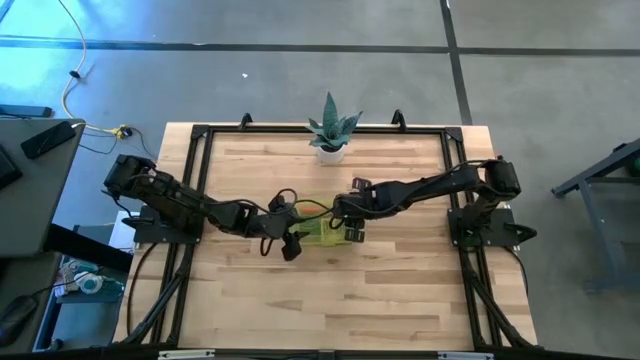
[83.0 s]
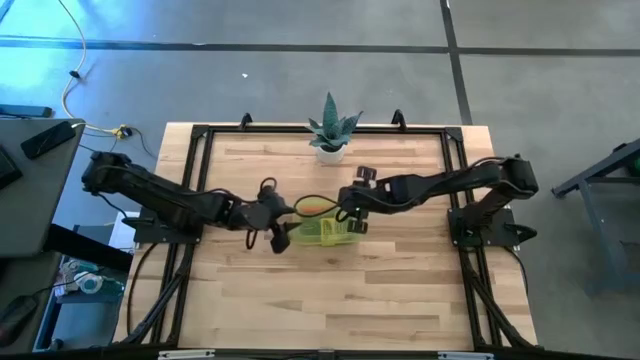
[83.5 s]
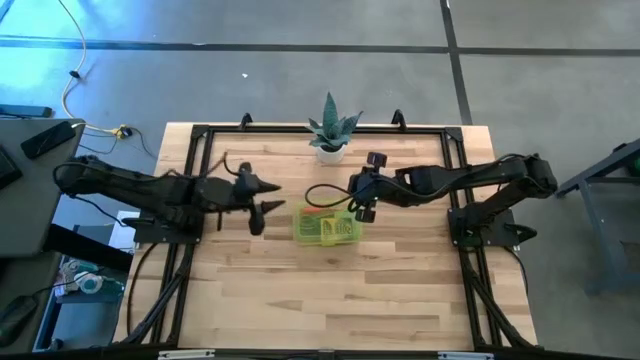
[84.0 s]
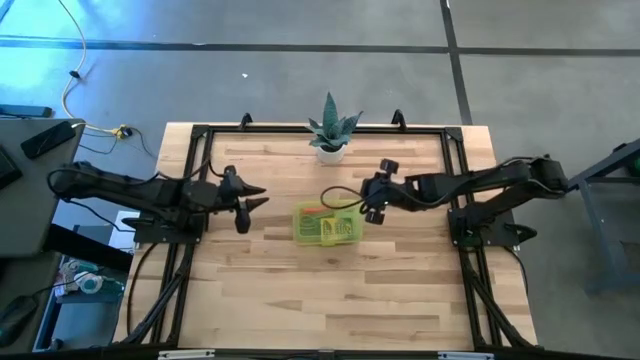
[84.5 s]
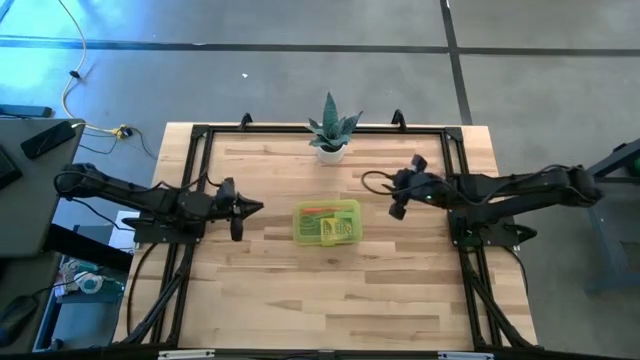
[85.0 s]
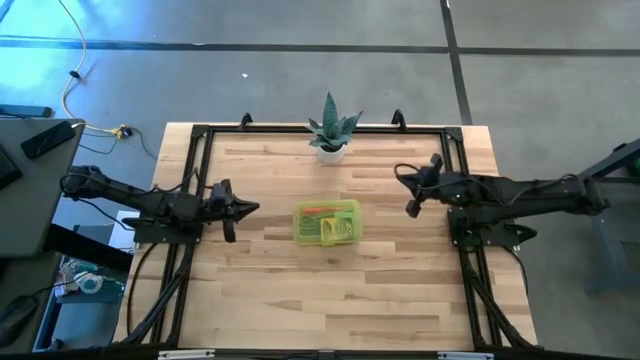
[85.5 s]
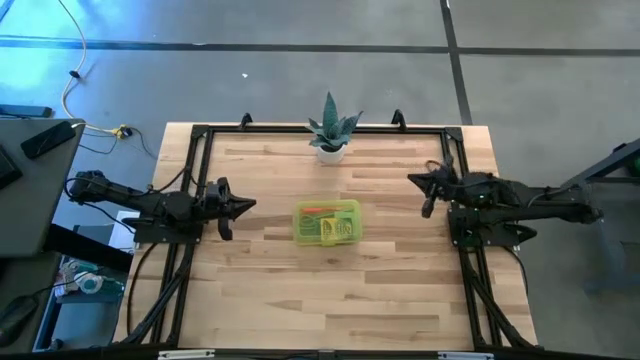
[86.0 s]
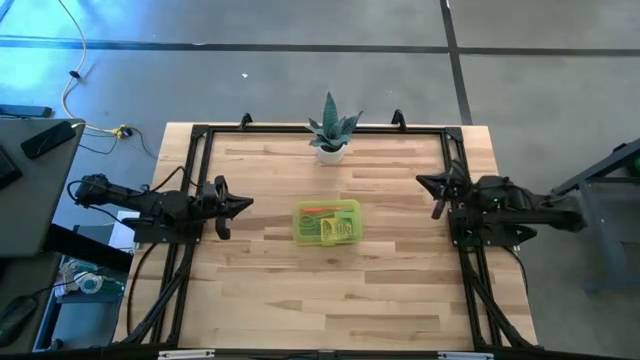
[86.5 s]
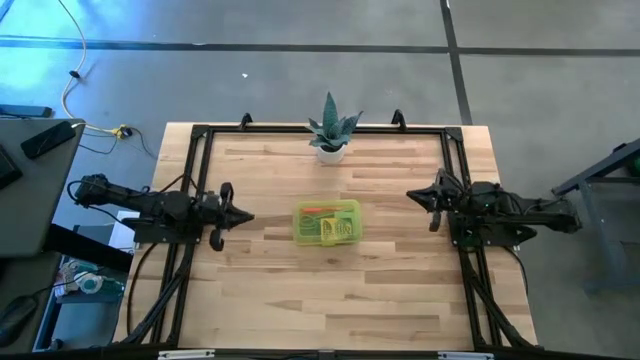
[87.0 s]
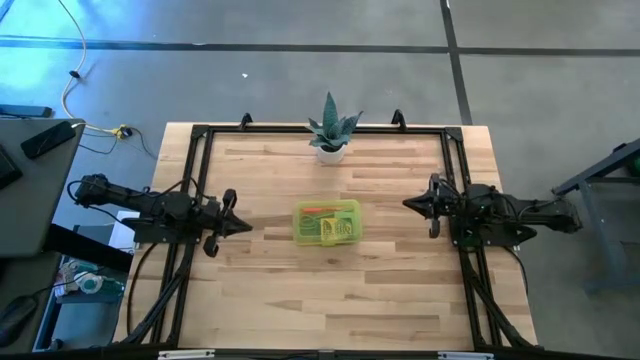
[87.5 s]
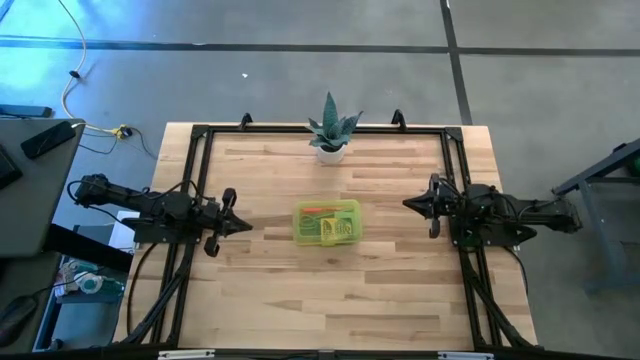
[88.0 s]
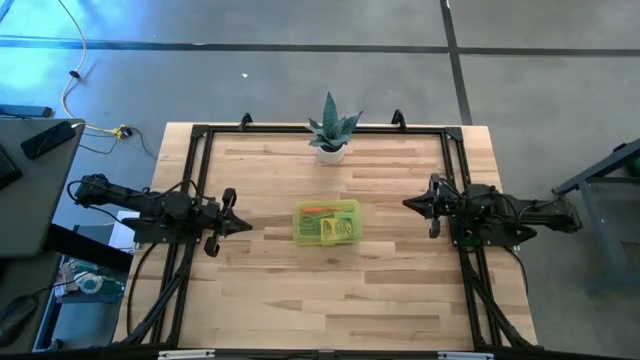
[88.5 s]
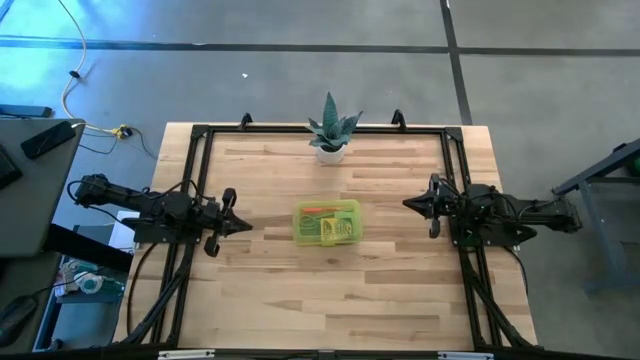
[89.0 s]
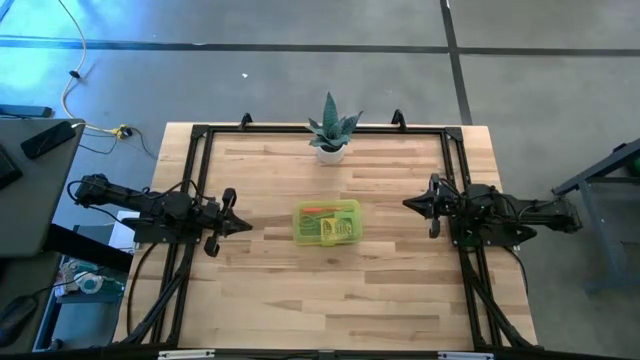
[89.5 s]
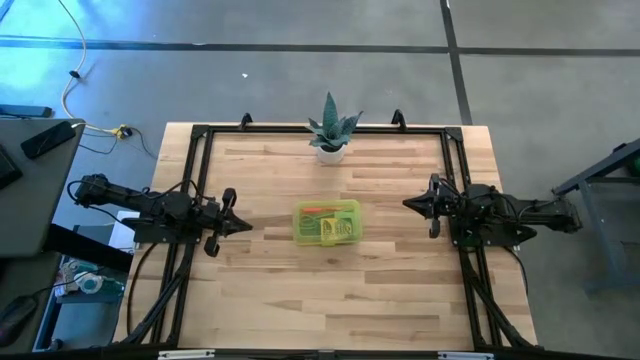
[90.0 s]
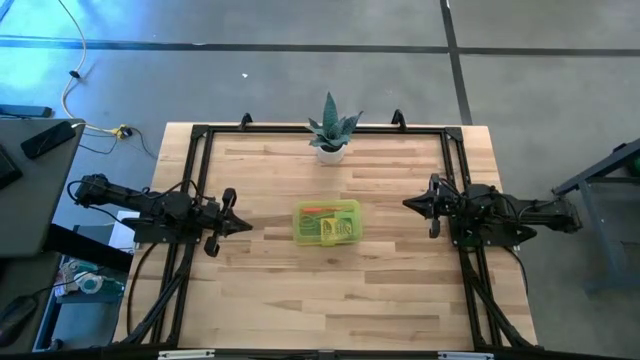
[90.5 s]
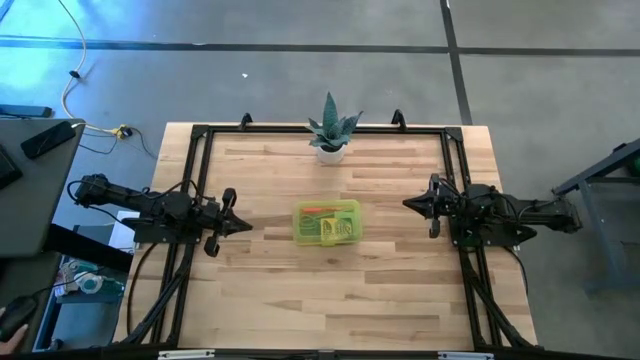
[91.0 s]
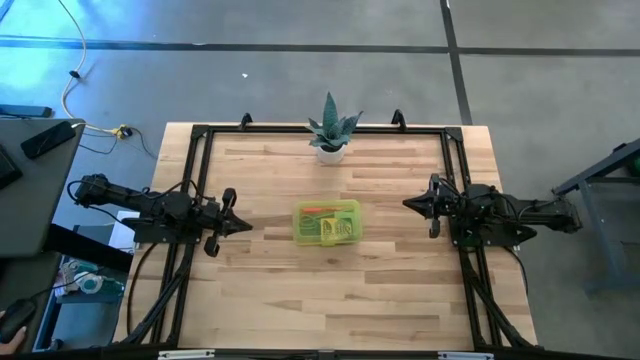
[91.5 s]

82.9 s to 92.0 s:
Task: Pack school essentials
Return to Home Position

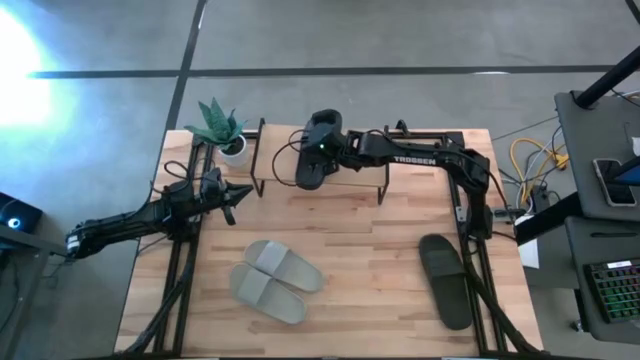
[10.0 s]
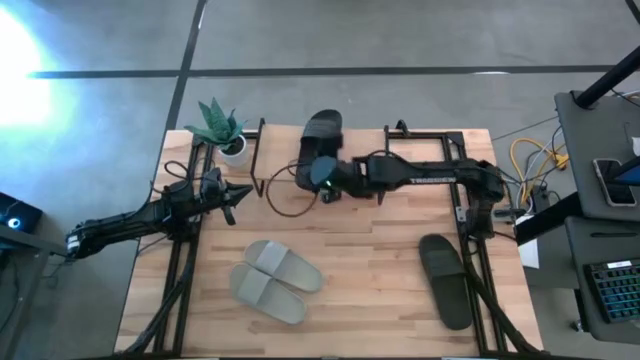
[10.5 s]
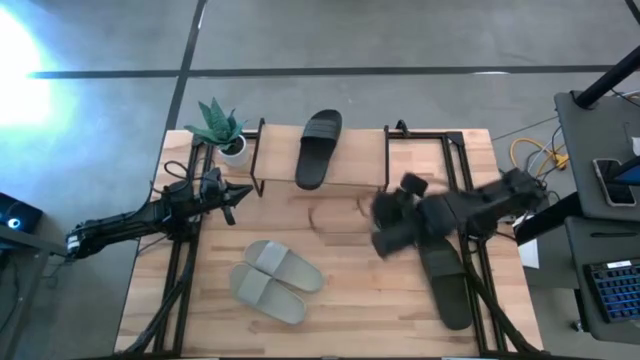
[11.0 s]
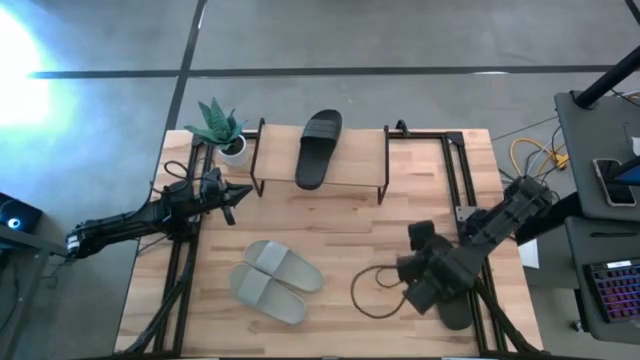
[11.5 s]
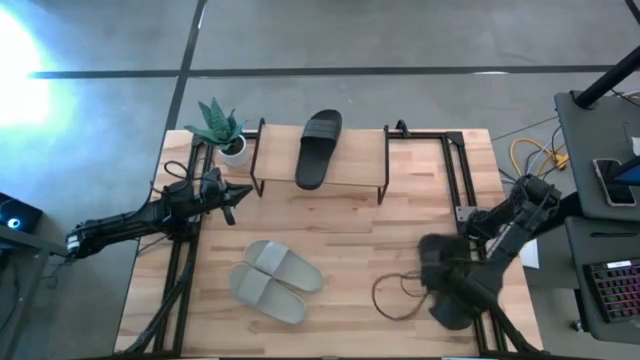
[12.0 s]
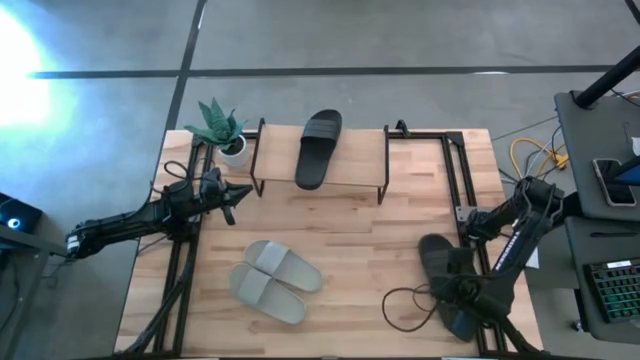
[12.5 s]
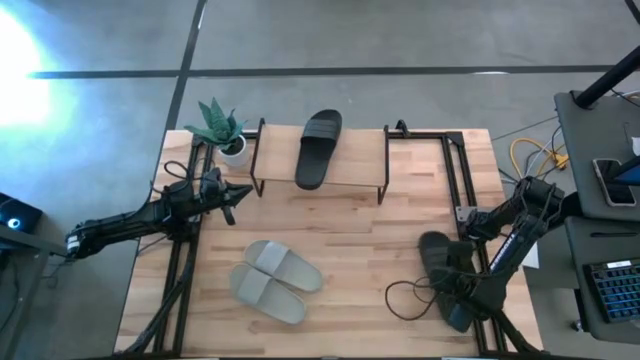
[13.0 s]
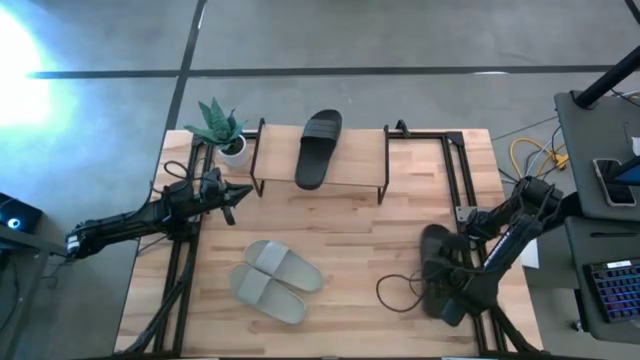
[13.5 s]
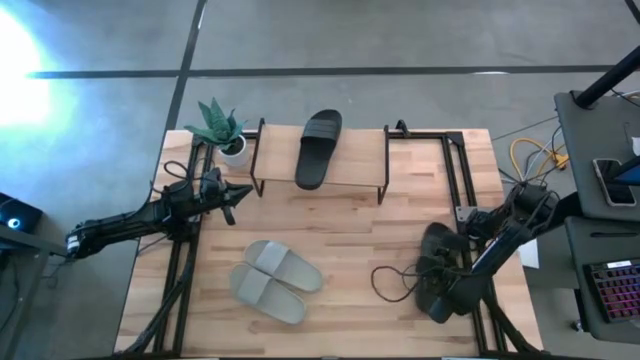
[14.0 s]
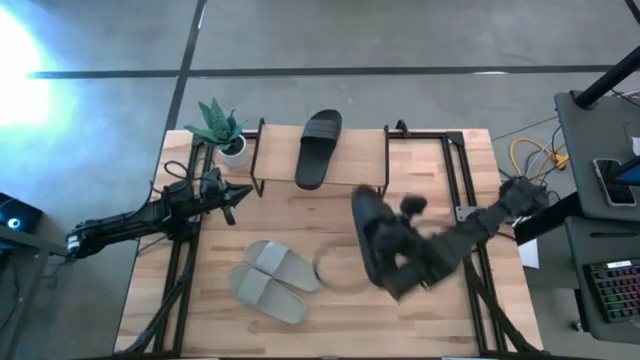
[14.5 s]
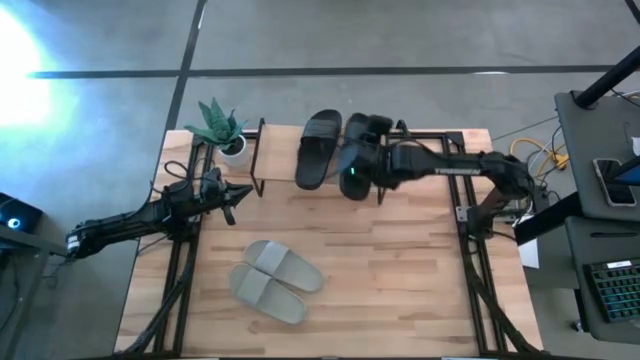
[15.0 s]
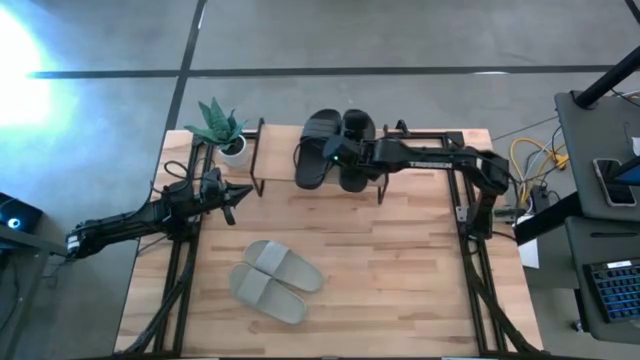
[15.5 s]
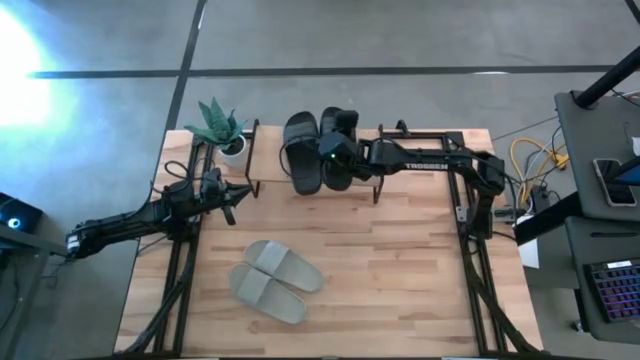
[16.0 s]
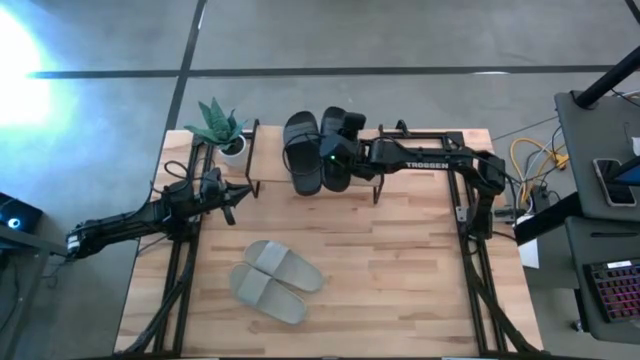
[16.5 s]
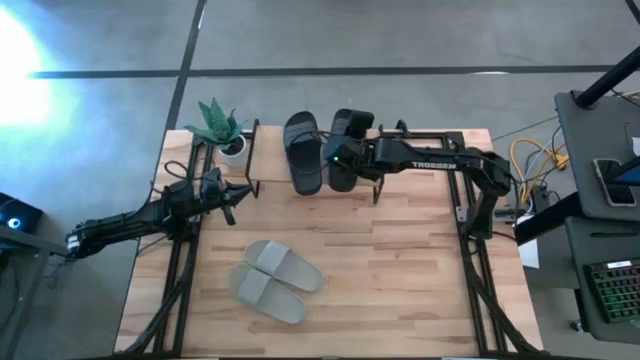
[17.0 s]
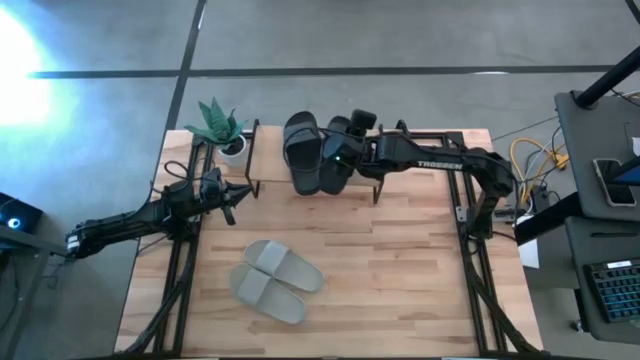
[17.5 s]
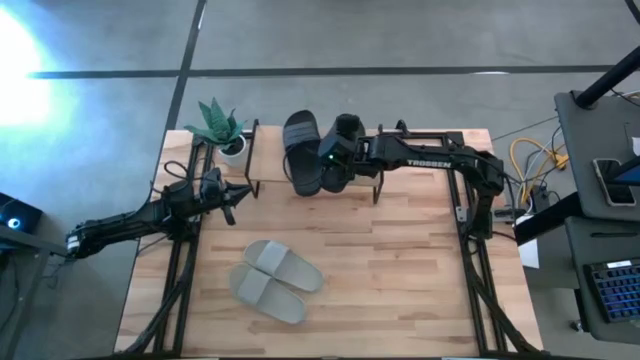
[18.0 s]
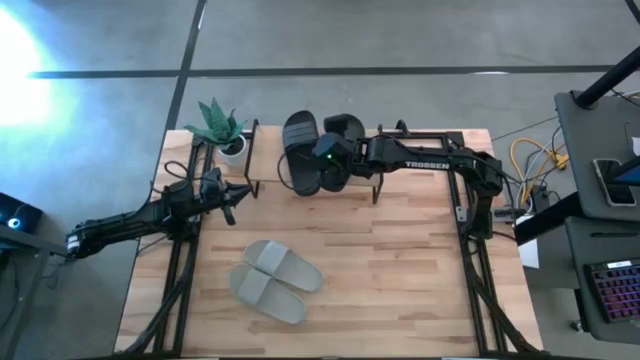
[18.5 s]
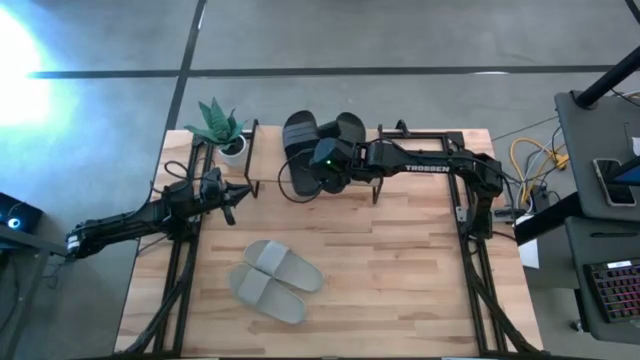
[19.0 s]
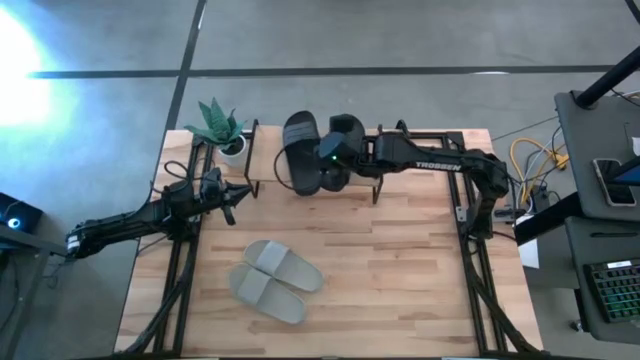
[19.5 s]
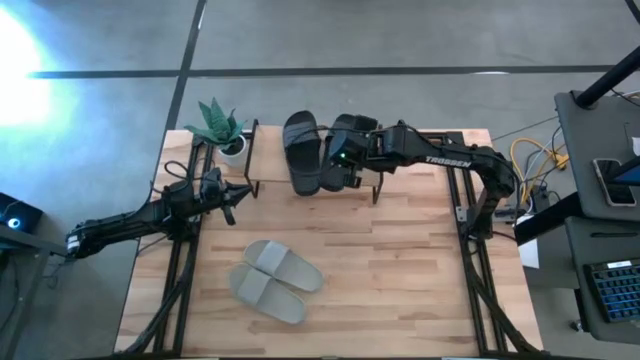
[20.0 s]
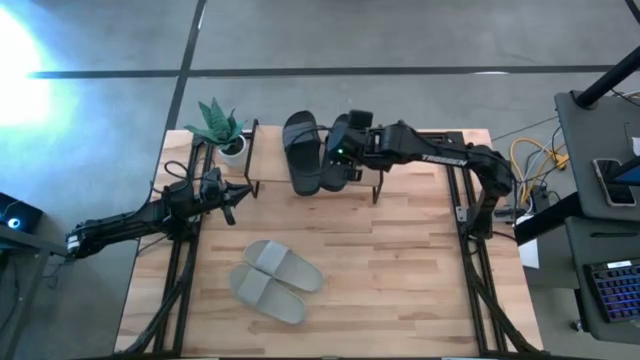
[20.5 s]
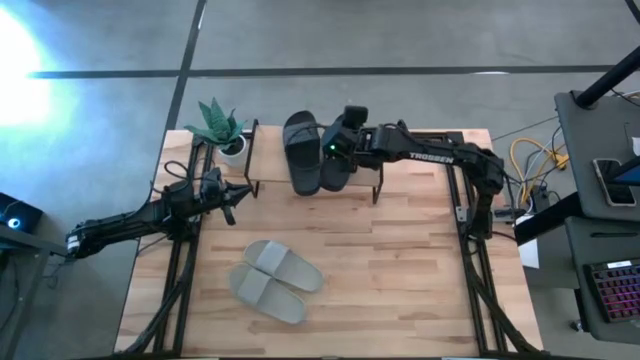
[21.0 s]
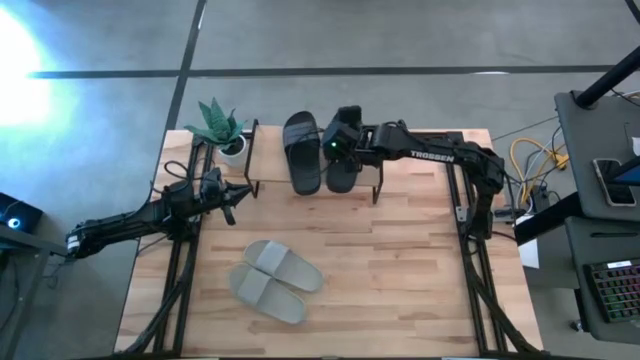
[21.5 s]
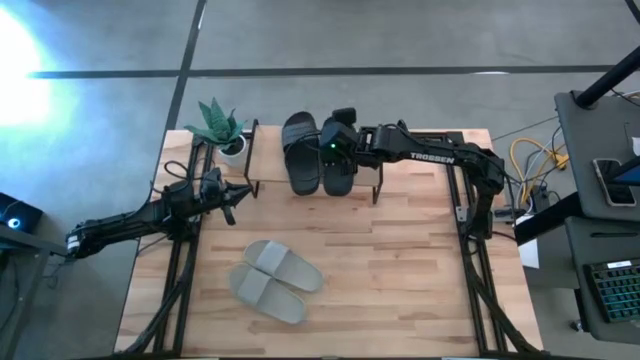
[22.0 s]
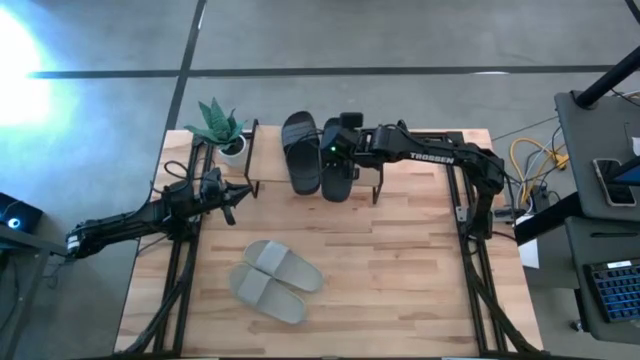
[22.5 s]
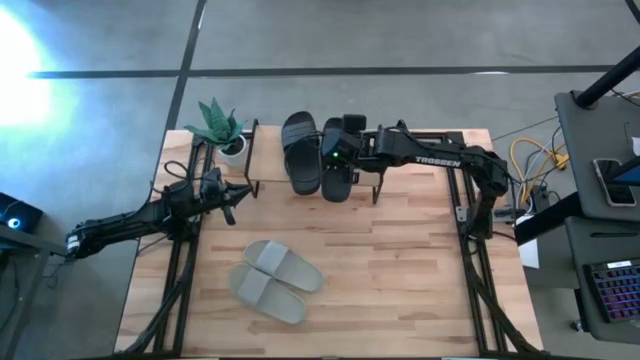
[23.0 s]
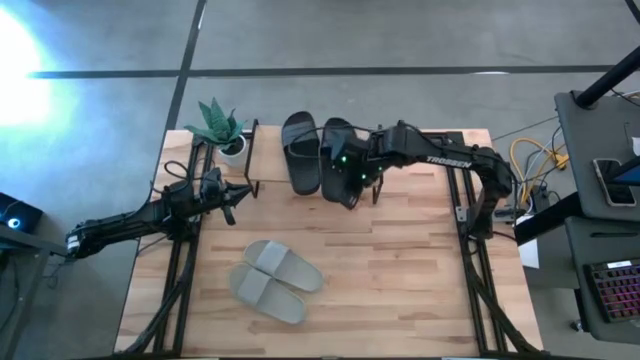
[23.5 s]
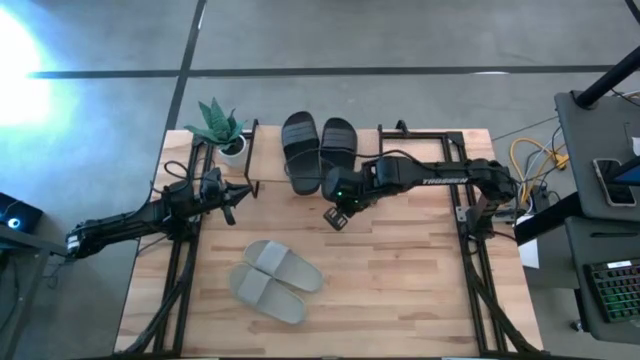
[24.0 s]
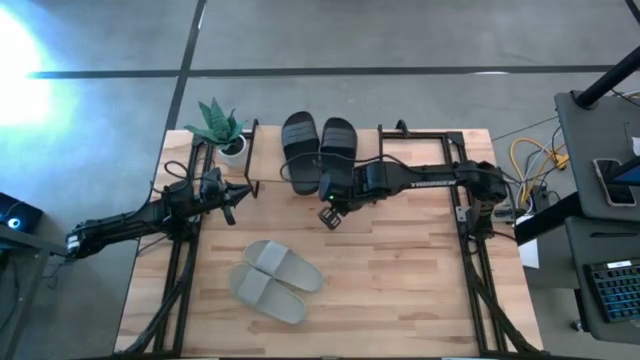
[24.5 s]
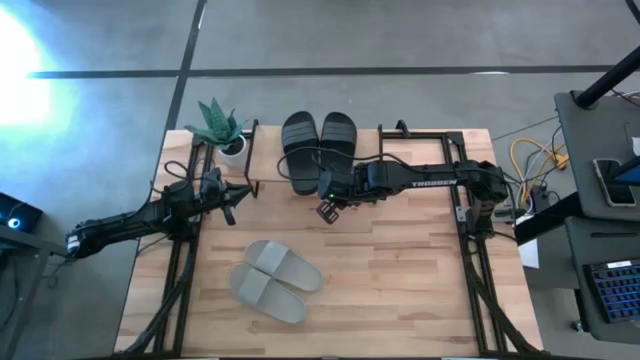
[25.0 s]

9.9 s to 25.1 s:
Task: Pick and place slides into the shelf
Put the black slipper on the shelf
